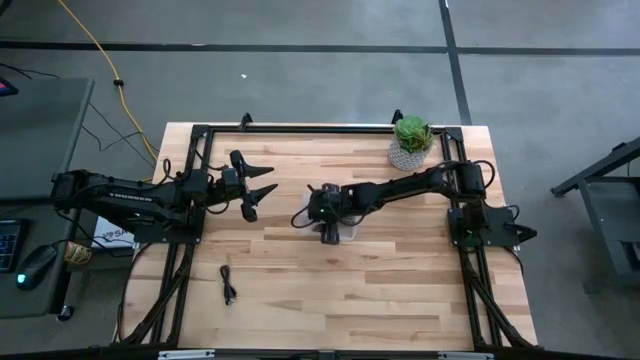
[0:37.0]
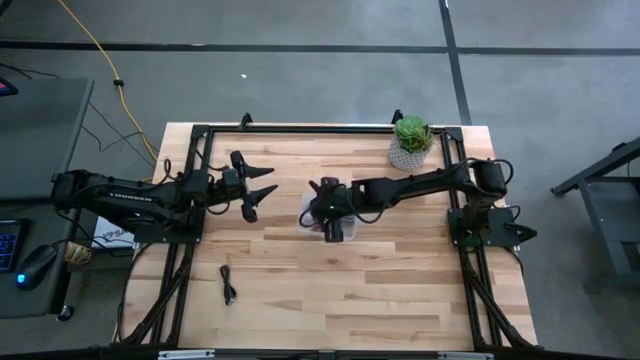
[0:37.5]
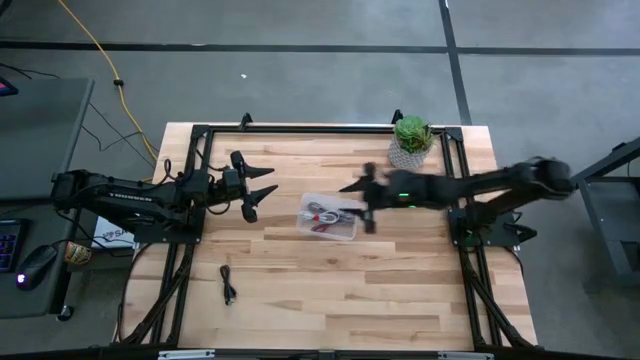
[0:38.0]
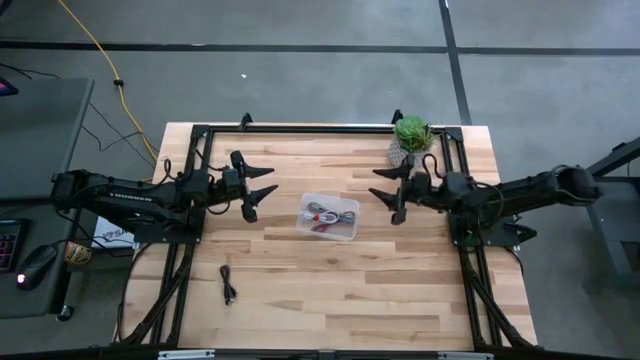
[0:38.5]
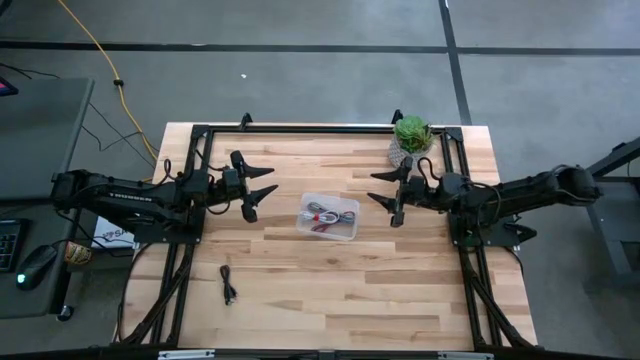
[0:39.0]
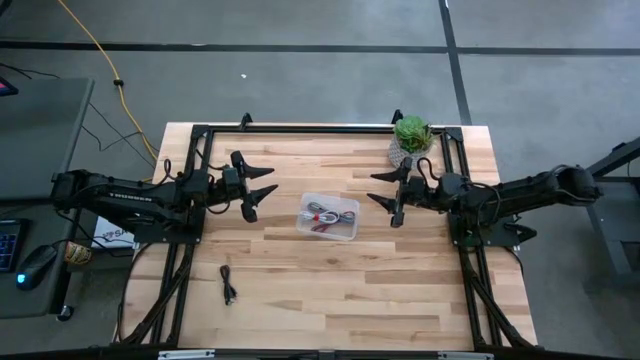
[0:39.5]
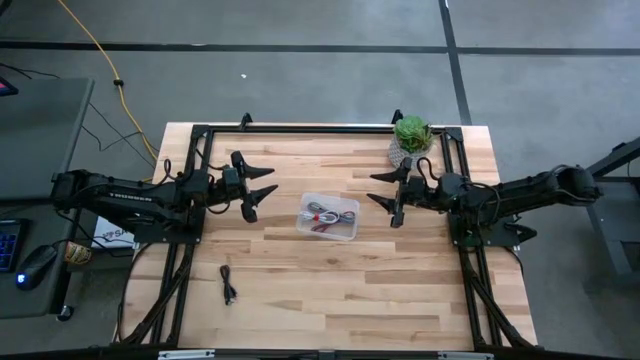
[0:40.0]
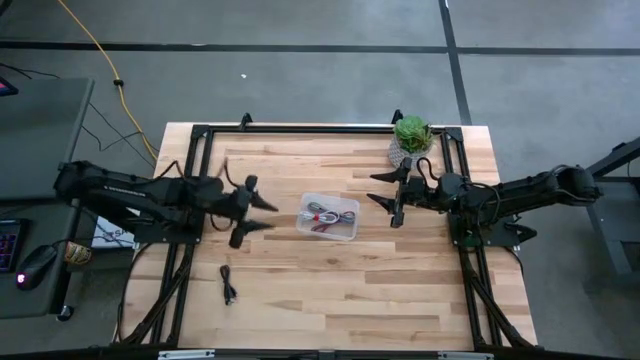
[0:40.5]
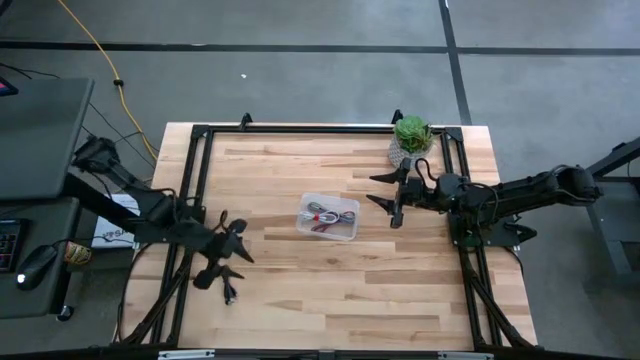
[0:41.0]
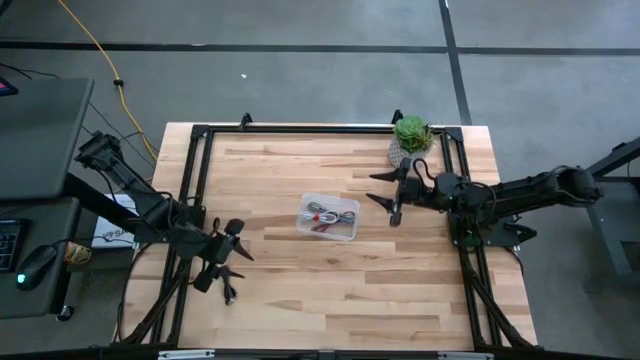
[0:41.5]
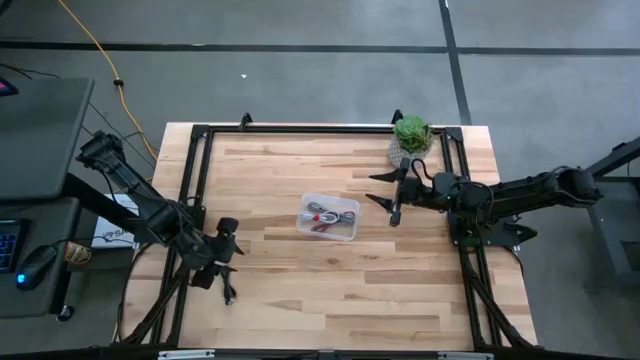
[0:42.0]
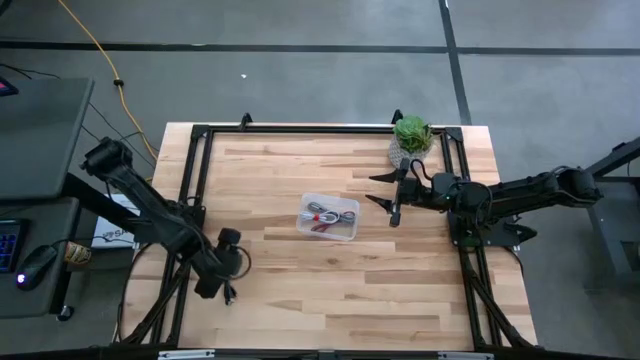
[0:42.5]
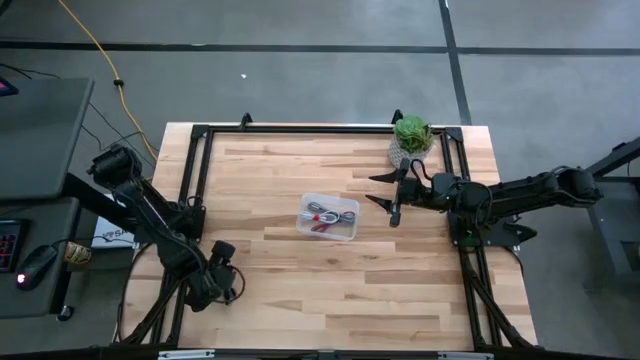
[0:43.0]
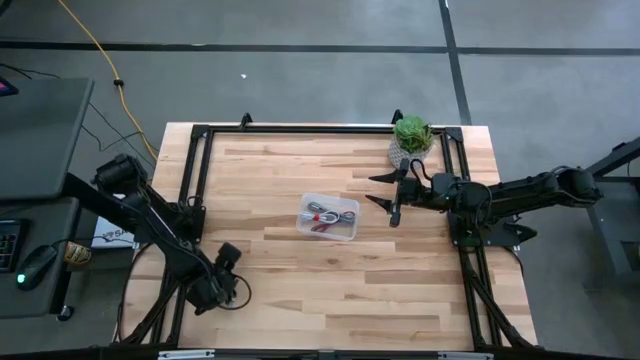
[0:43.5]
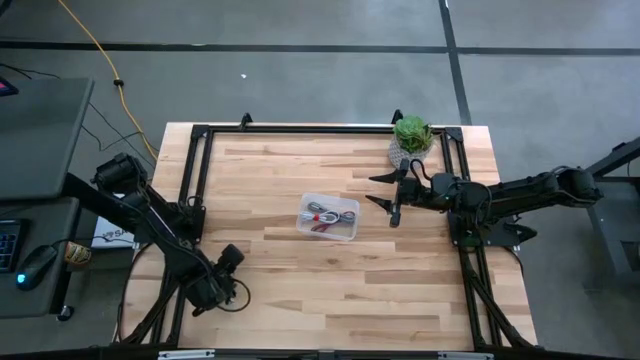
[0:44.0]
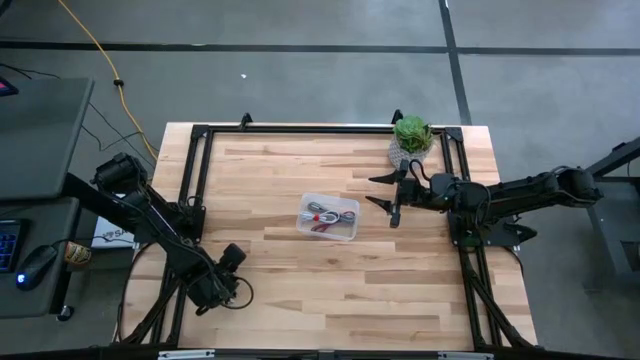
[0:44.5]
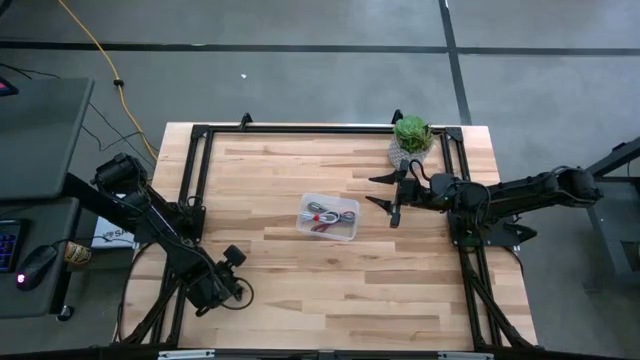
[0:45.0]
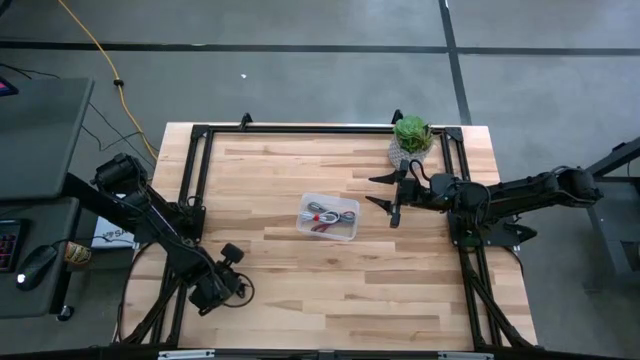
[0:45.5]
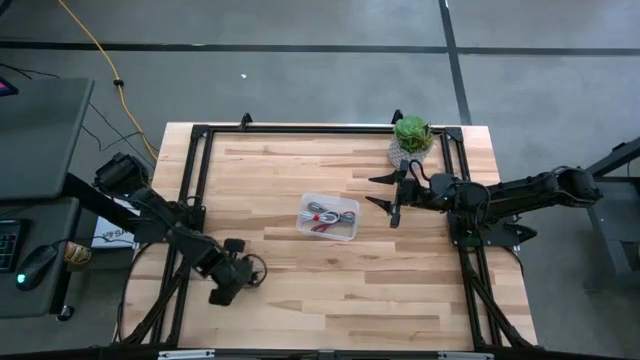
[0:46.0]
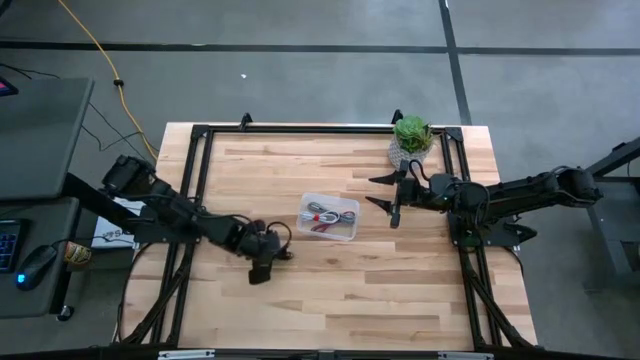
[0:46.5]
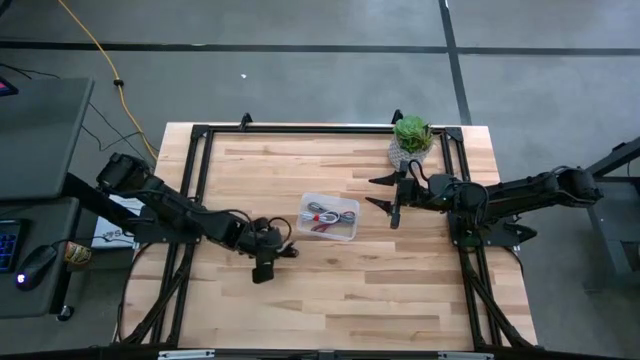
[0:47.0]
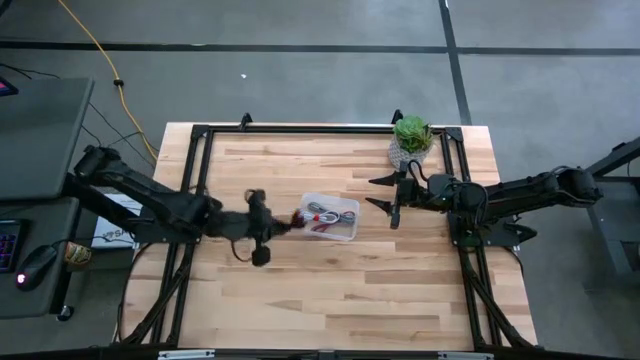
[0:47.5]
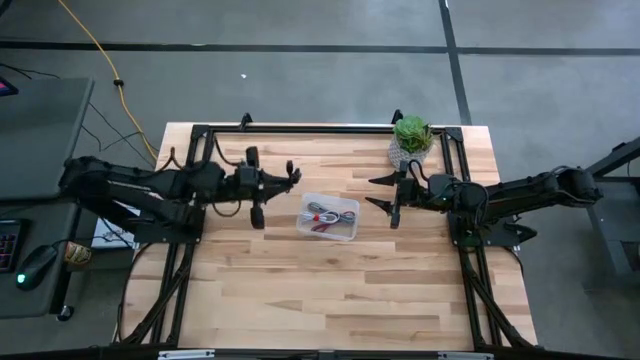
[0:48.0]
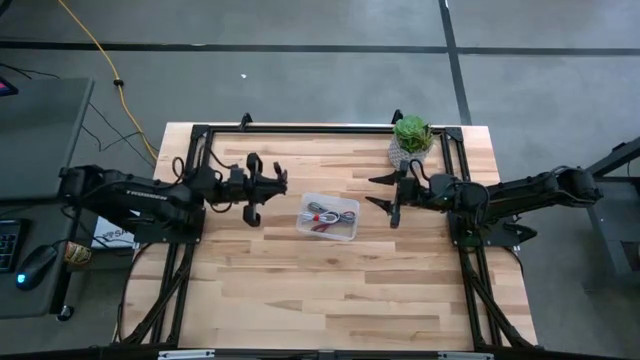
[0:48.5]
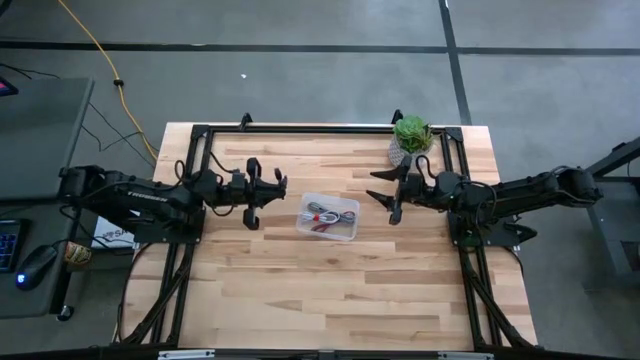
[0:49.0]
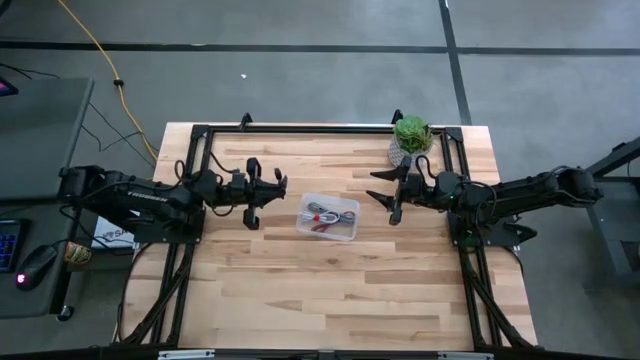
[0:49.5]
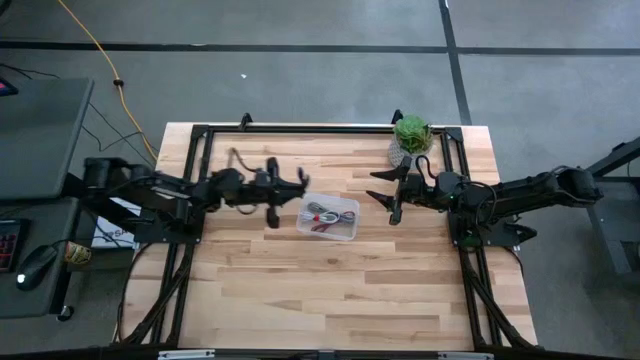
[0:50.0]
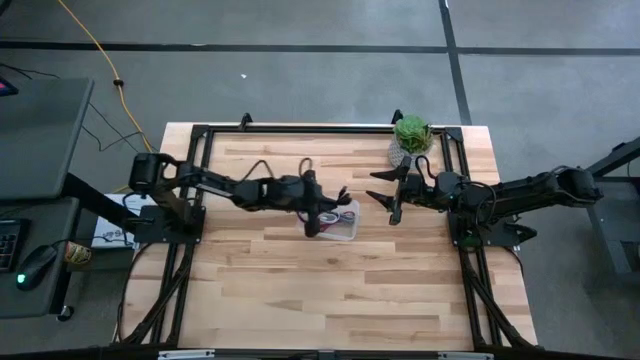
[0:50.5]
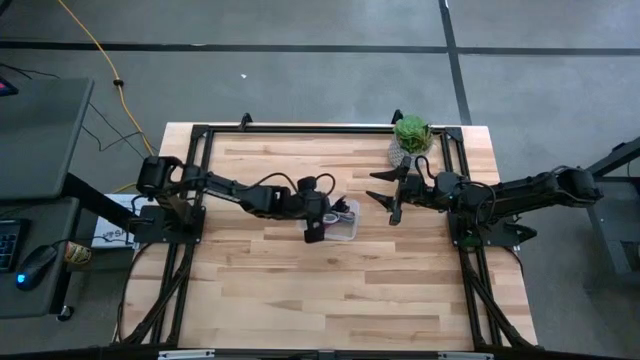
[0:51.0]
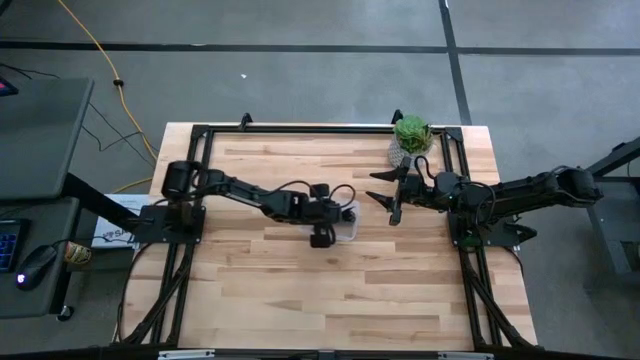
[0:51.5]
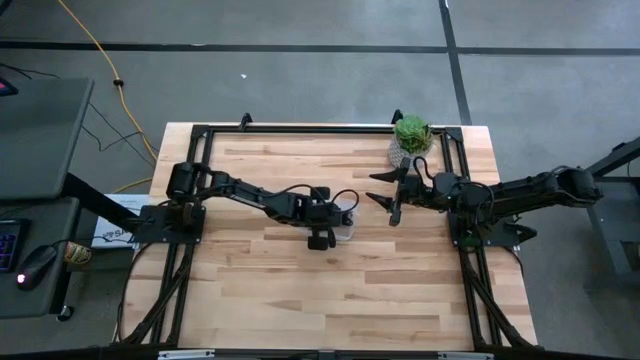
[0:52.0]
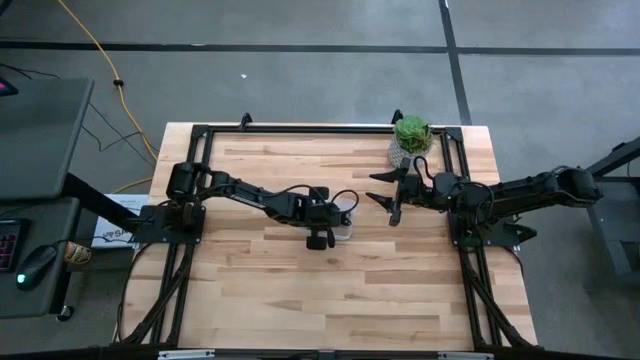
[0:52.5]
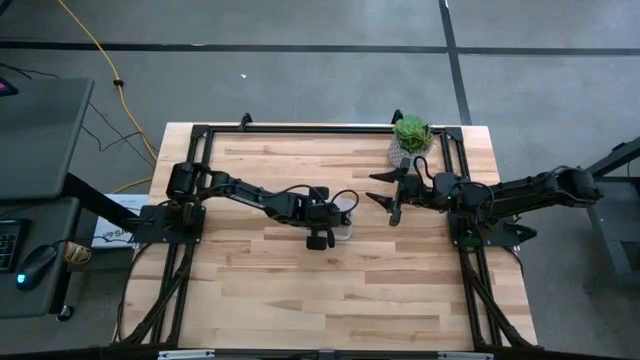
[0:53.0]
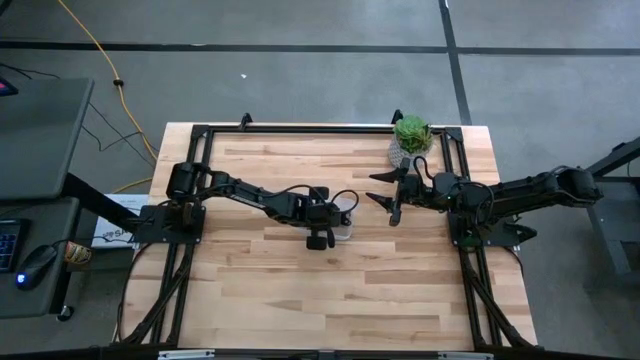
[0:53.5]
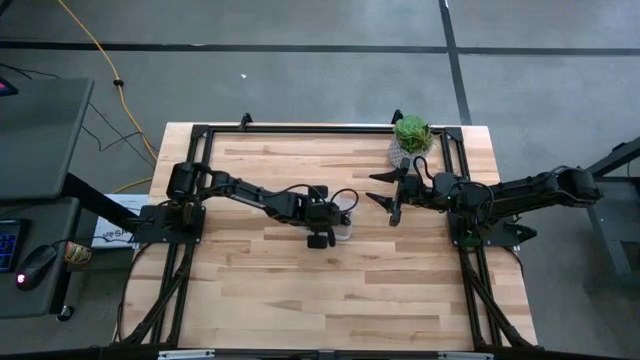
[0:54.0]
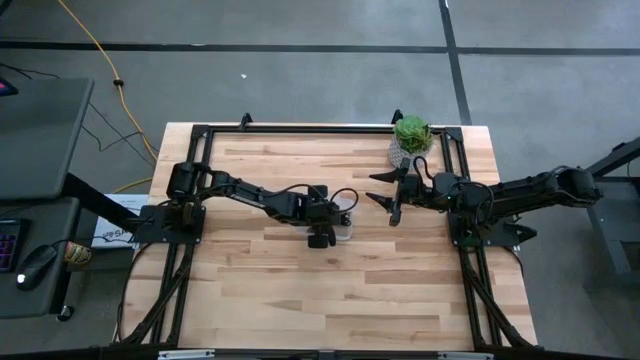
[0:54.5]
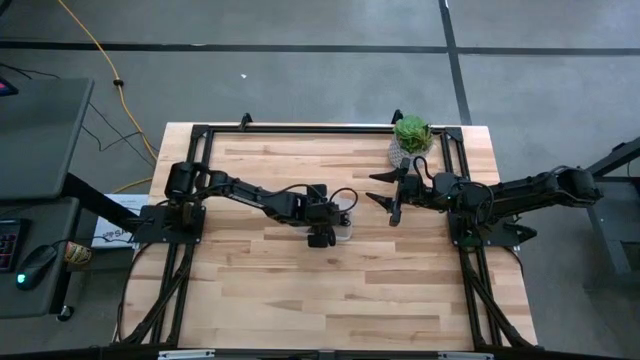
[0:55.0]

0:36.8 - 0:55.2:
Task: Pick and place USB-C Cables
Put the black charger cable into the transparent bin

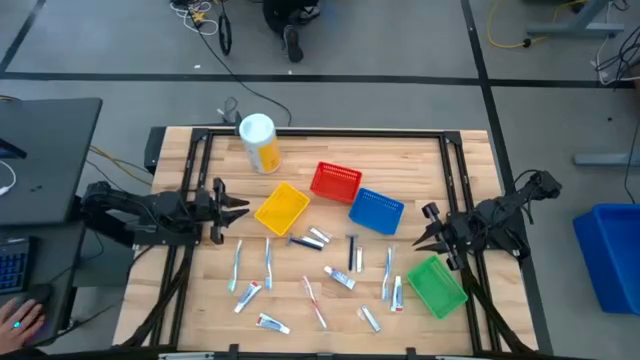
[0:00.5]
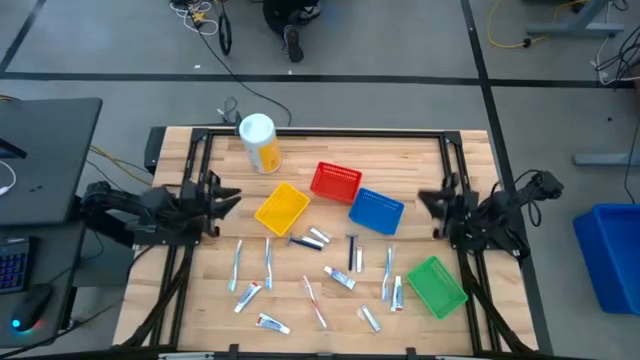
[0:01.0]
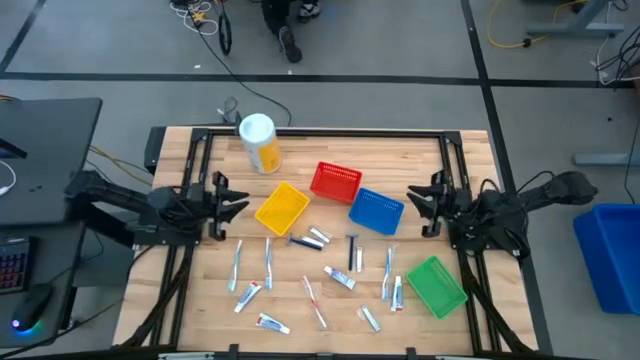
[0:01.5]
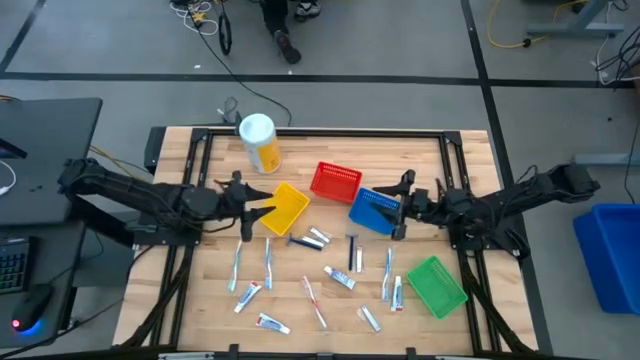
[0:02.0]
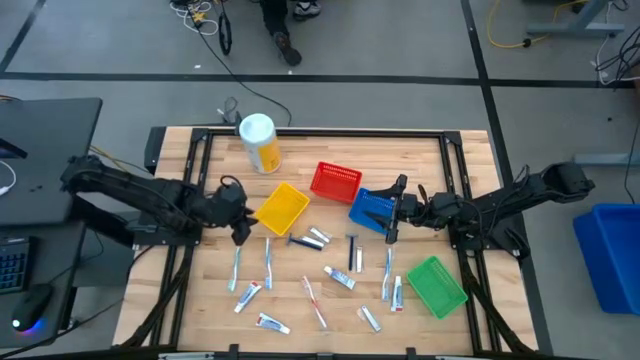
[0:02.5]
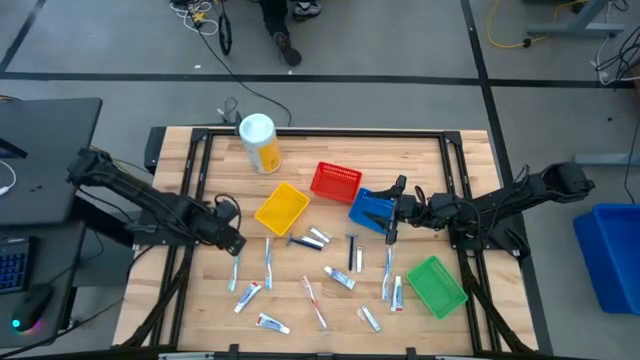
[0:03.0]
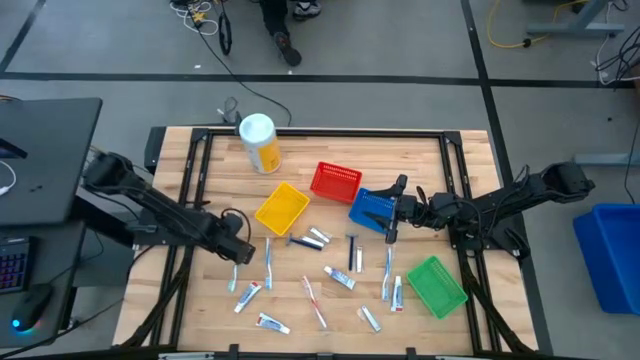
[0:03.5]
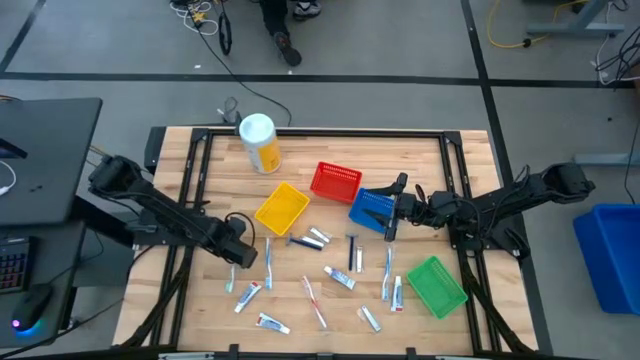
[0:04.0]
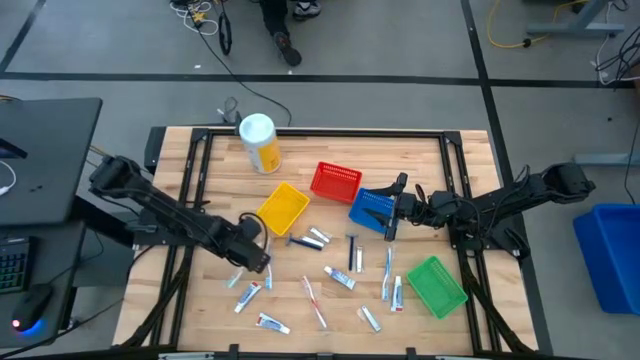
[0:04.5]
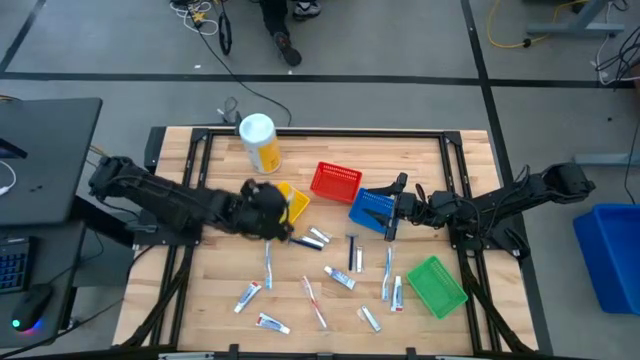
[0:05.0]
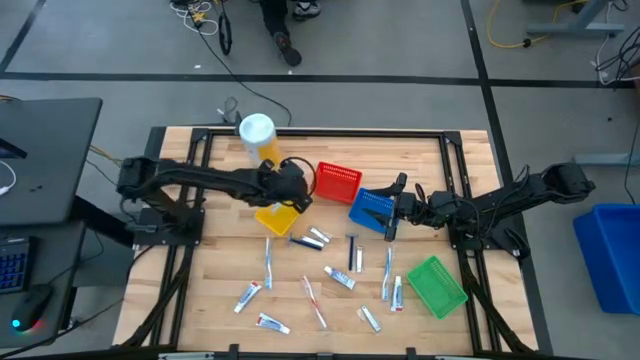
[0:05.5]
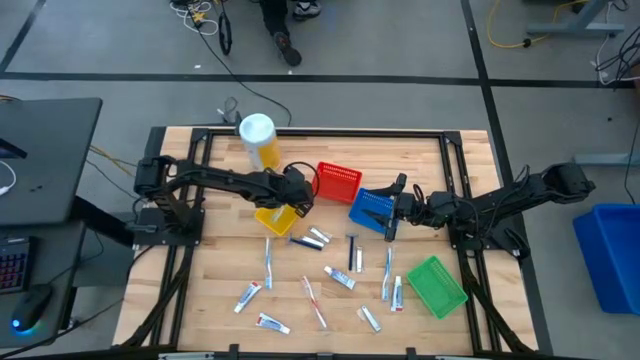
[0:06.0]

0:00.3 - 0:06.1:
Task: Pick & Place Travel size toiletries
Put the green toothbrush into the yellow bin
